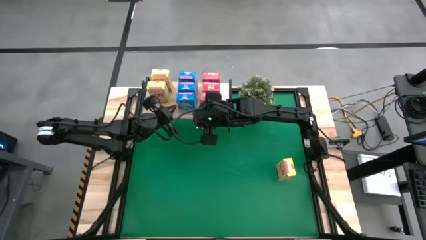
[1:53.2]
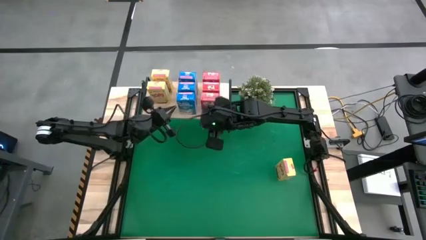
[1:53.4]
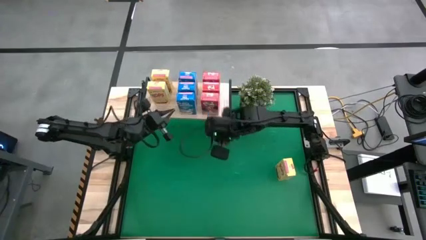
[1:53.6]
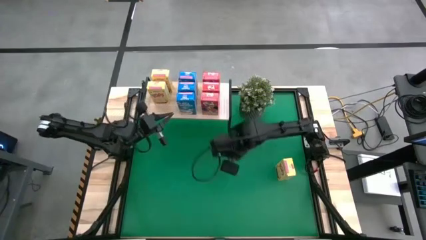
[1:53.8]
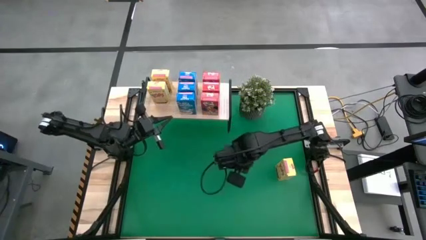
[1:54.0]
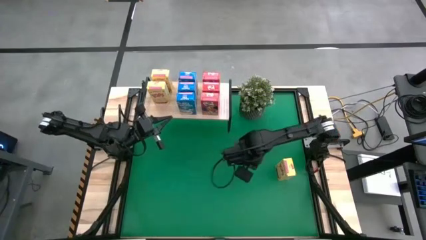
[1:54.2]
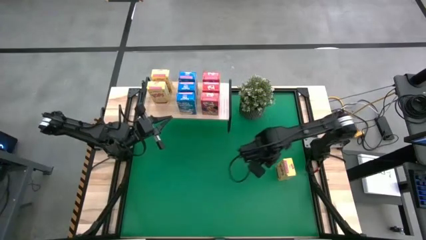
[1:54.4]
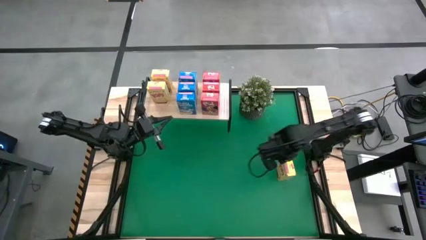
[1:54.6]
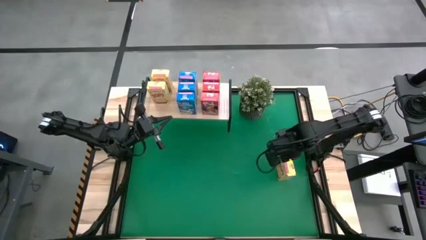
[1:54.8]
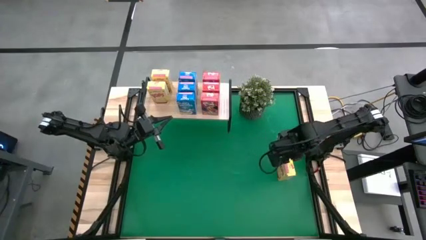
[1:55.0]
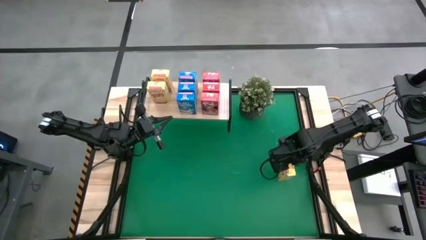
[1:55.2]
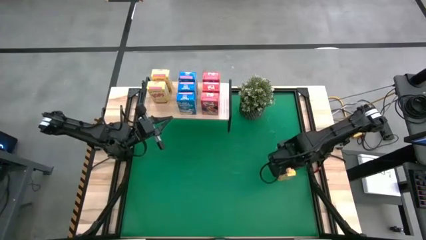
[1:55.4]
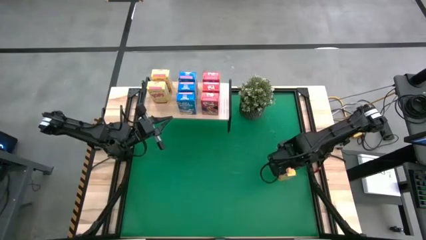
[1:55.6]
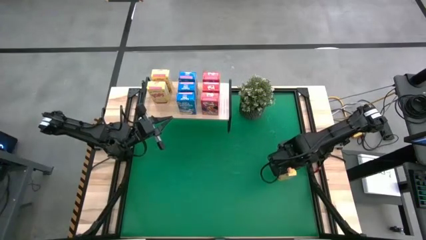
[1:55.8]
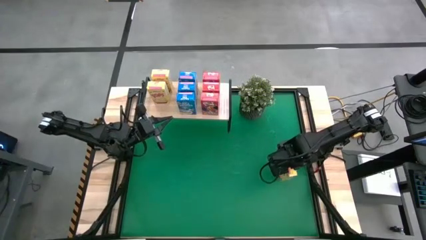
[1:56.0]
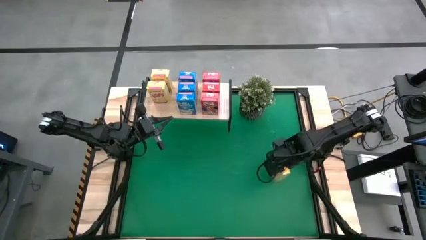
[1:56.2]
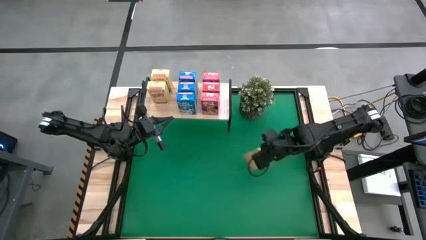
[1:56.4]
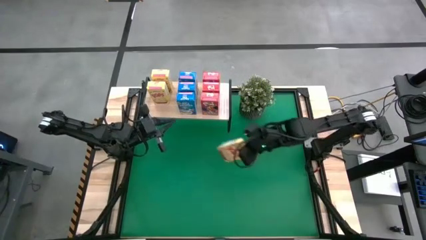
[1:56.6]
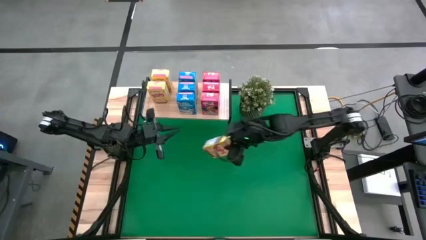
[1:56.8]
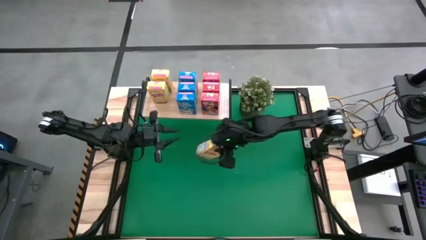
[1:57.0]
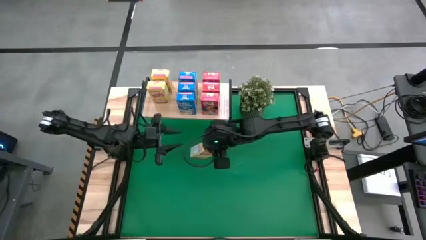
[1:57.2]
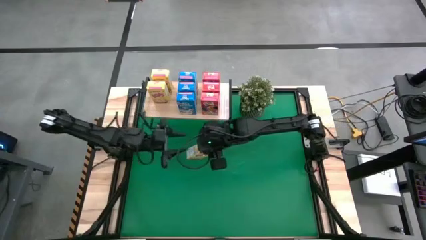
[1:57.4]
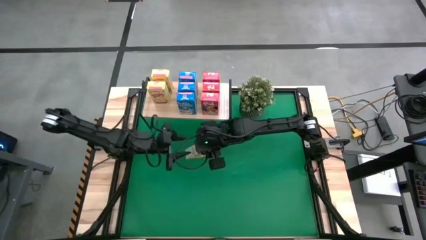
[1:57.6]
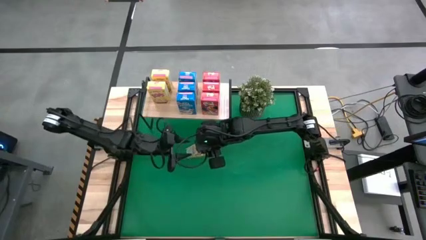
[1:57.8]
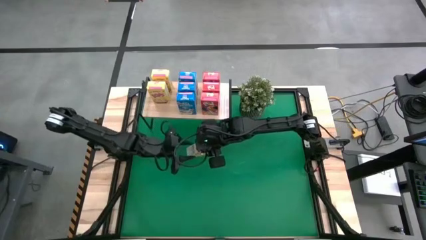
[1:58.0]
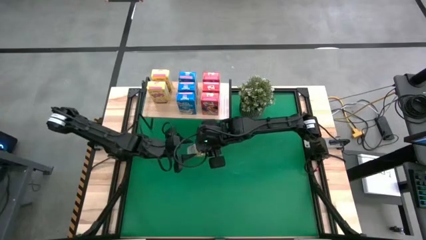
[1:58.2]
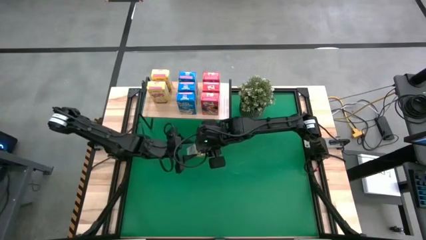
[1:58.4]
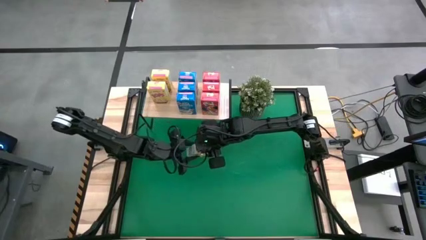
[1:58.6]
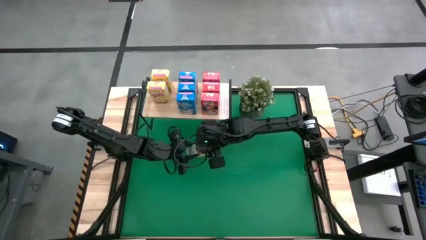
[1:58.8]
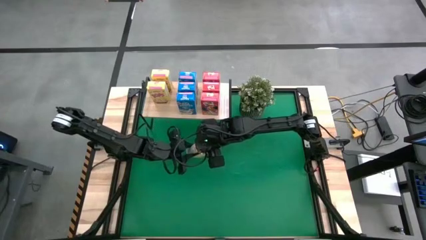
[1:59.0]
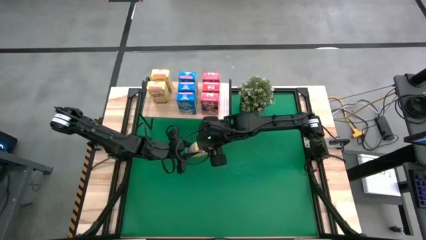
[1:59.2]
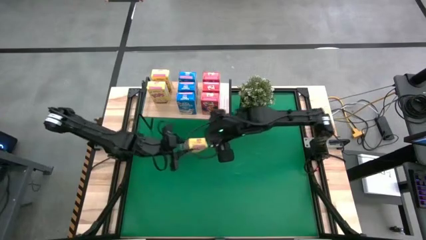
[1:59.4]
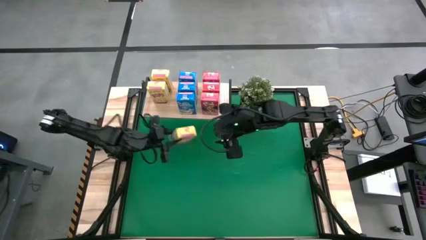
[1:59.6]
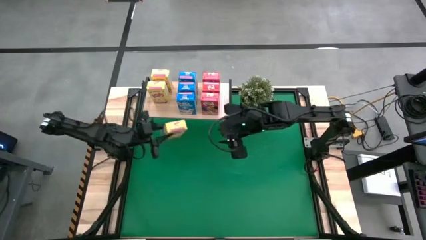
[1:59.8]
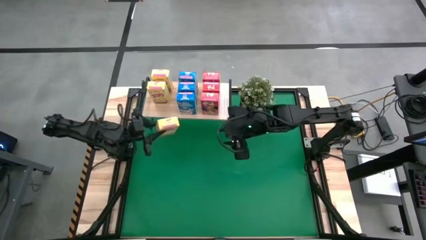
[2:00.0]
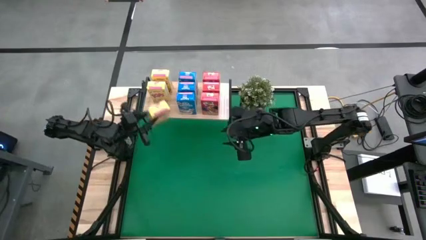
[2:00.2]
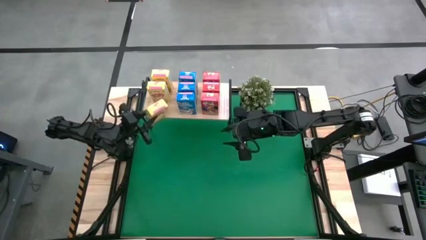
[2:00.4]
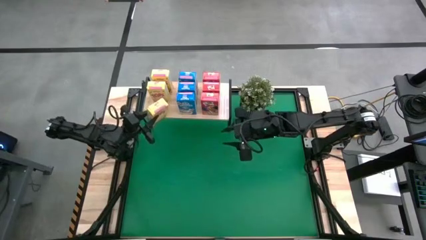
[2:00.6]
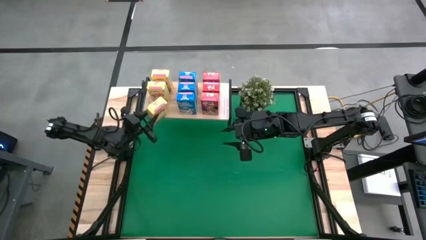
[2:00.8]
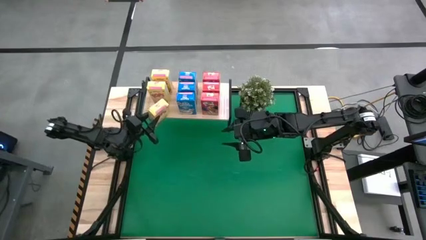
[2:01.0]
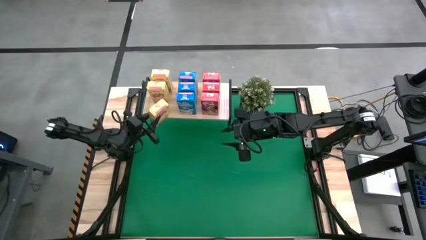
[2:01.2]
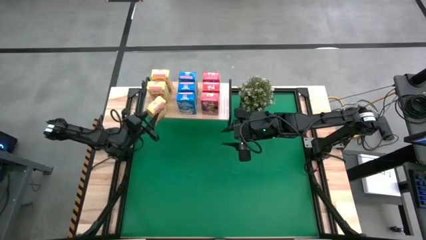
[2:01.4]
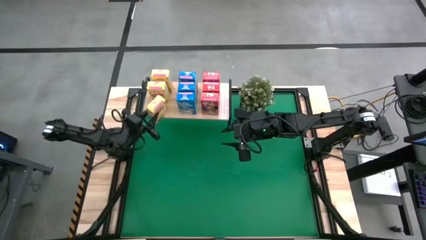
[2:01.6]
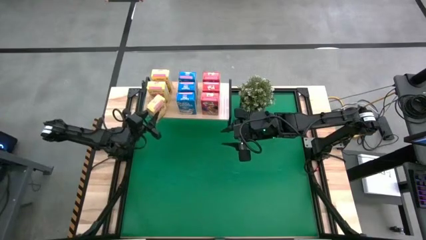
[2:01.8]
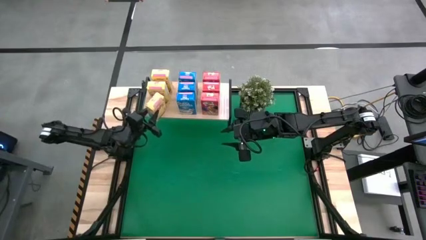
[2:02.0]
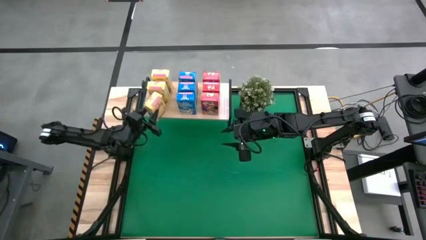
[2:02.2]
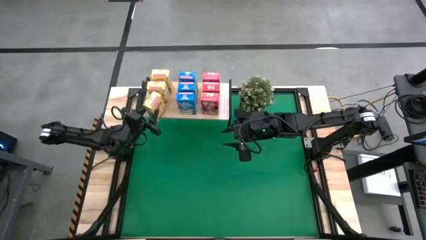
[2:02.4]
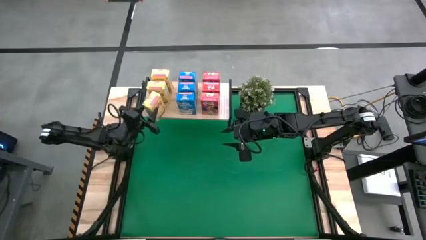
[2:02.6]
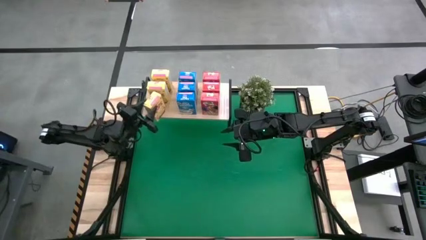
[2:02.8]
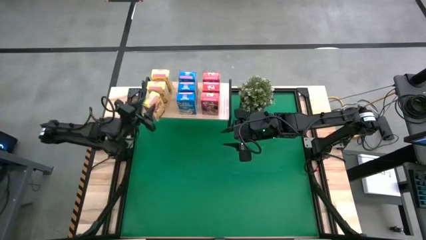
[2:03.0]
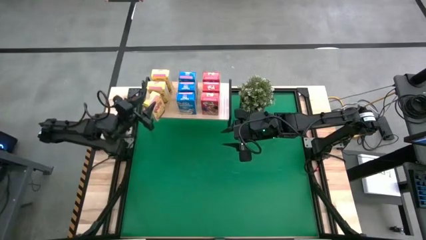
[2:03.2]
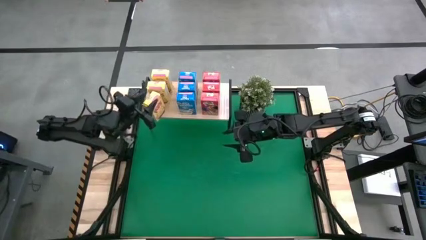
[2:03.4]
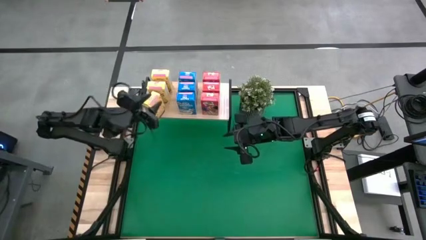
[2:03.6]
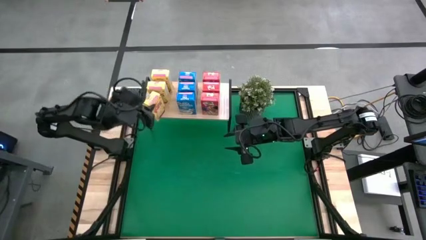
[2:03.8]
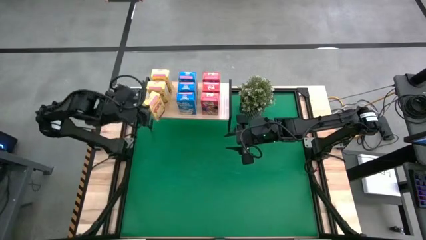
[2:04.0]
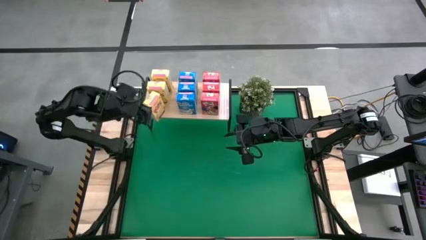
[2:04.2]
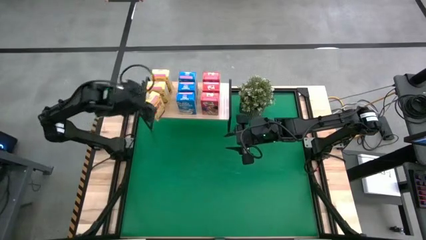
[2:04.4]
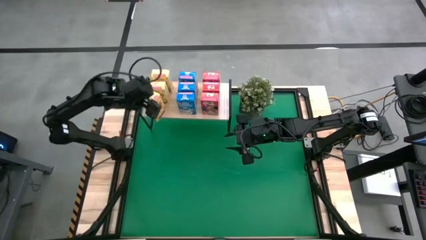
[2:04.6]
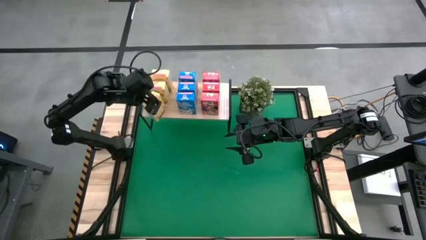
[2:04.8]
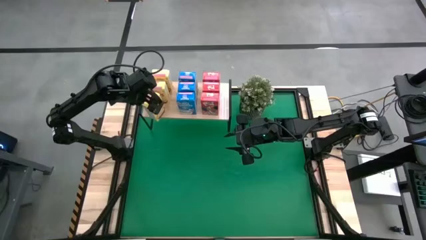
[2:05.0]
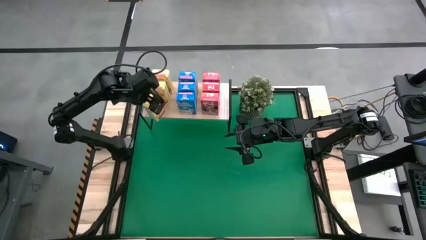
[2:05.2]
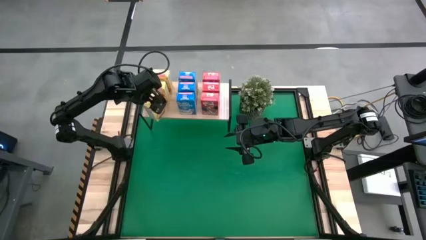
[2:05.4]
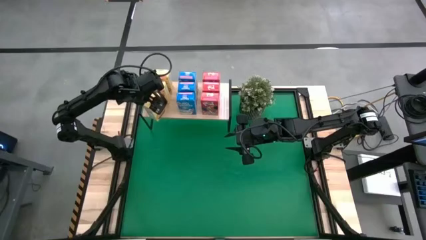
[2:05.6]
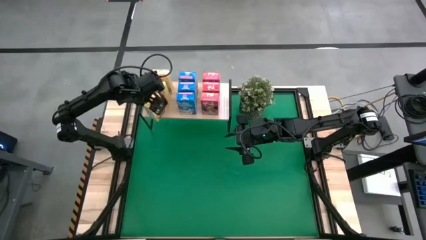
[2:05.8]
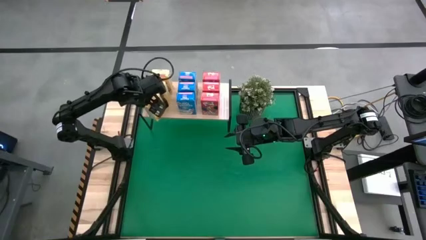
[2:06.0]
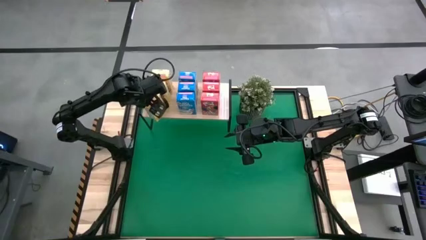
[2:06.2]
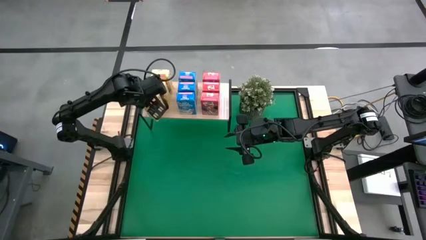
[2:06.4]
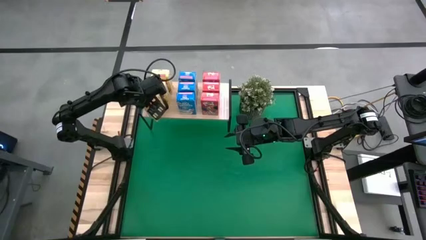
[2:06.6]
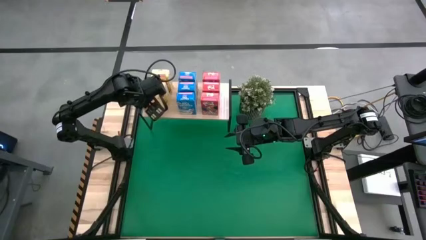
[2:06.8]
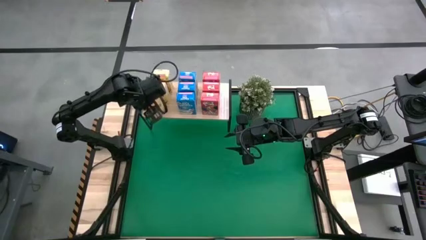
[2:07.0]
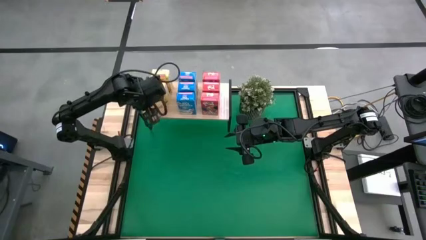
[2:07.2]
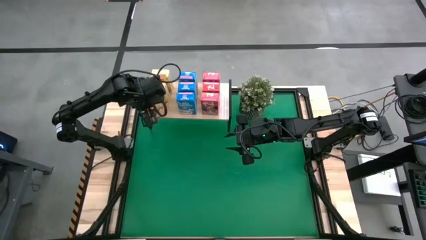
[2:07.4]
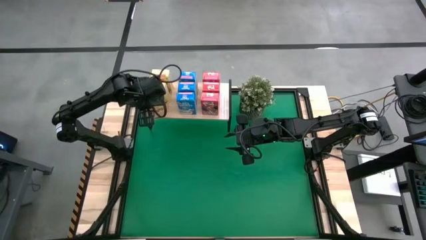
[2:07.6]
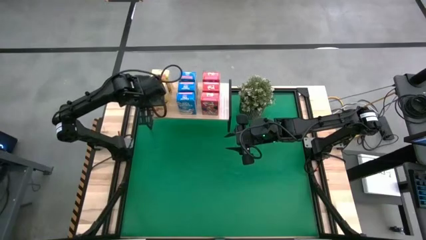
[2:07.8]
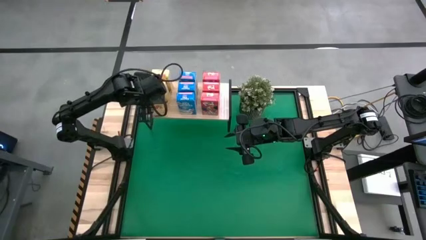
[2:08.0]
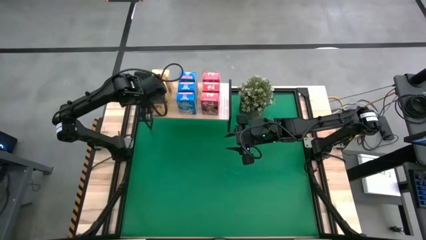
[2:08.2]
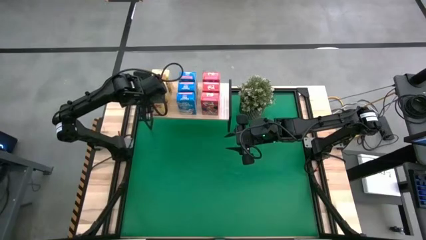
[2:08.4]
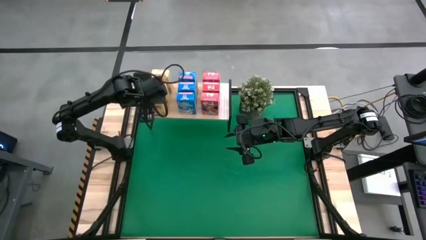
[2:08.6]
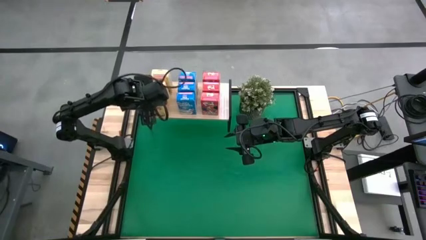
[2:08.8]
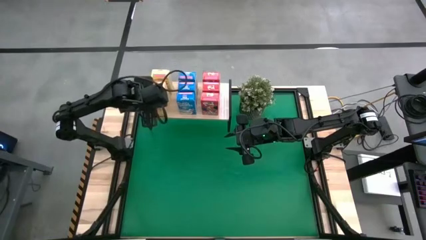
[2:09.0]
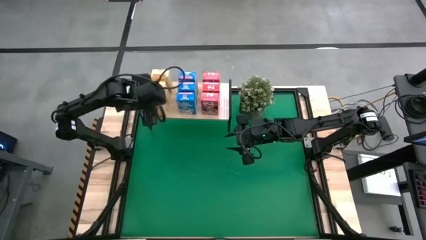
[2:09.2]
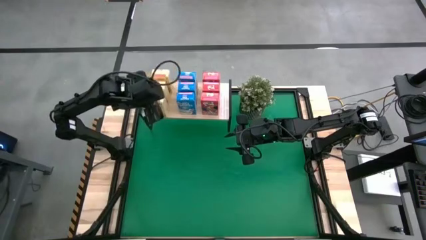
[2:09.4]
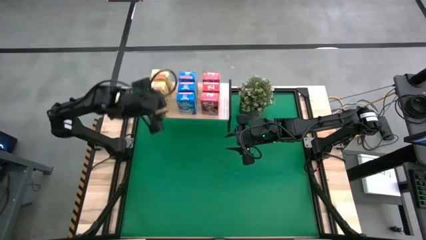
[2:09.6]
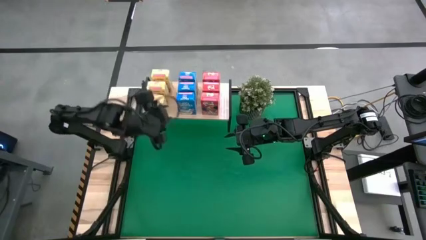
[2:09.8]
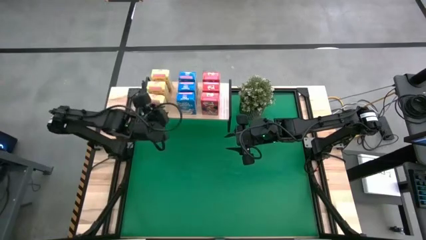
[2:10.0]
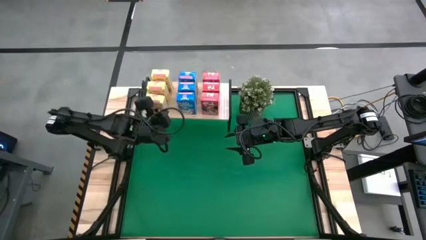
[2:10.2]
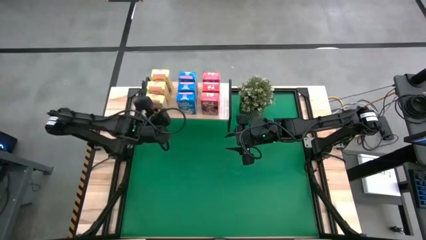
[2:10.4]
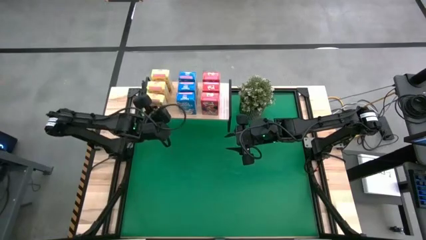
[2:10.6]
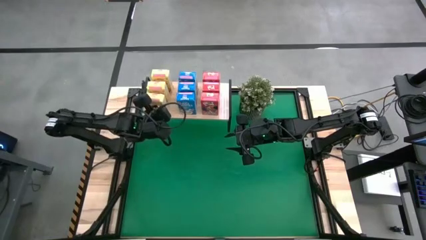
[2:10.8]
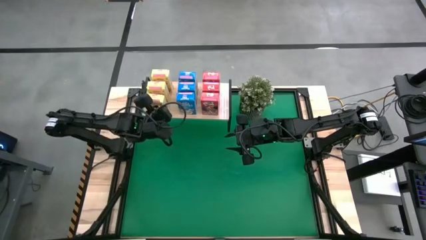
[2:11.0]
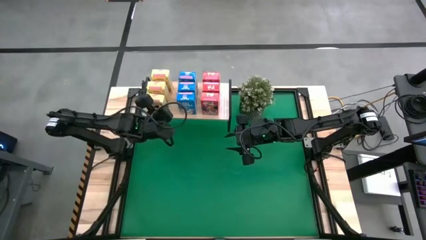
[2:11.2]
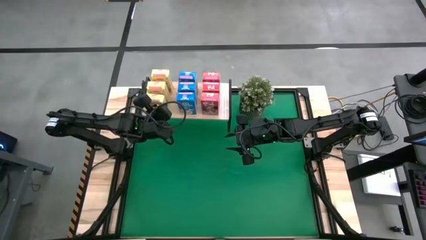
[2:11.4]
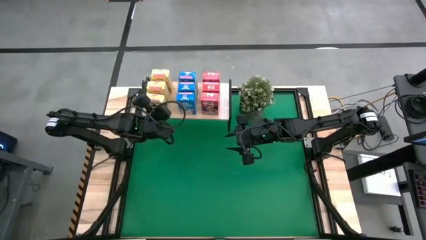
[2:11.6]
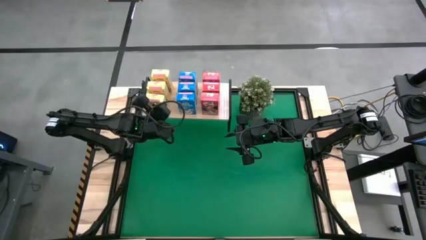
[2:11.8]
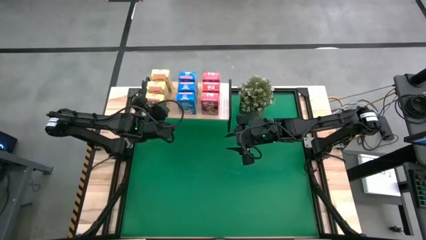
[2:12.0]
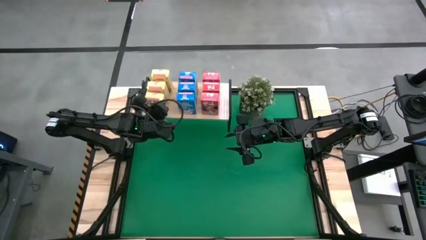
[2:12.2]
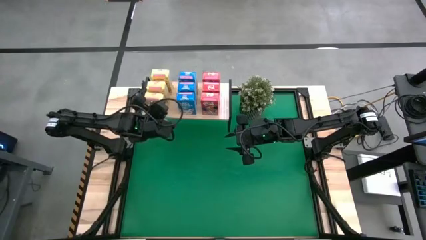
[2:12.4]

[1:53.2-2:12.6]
Task: Stack cereal on shelf
Put the yellow cereal box on the shelf aligned with the other yellow cereal boxes
